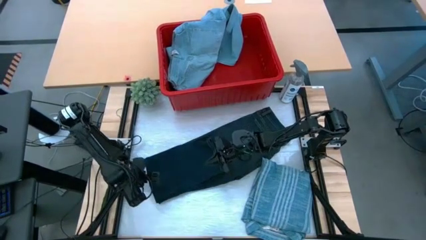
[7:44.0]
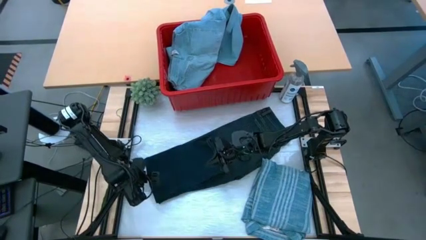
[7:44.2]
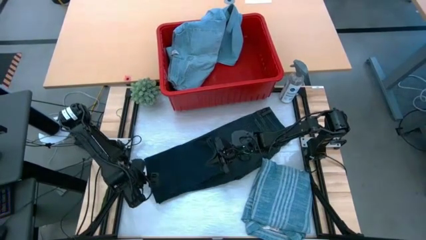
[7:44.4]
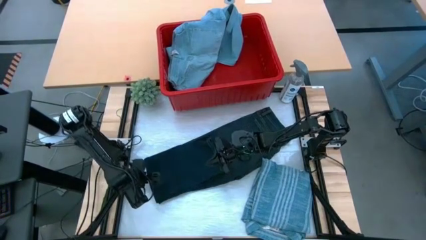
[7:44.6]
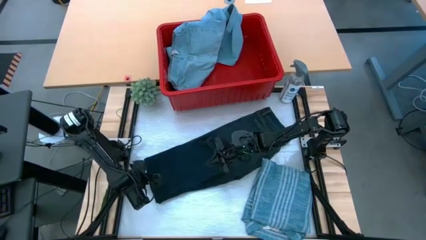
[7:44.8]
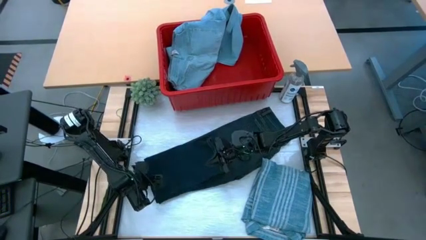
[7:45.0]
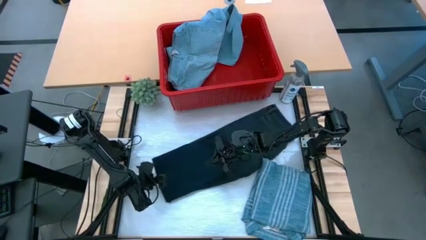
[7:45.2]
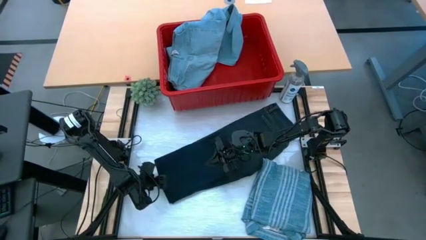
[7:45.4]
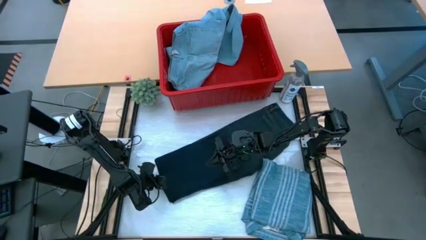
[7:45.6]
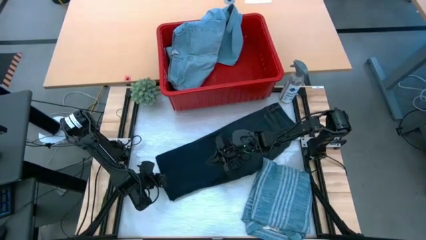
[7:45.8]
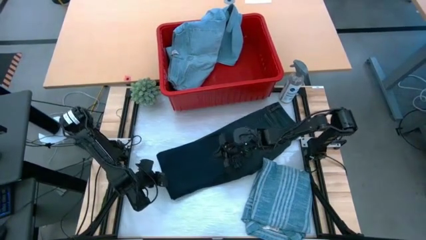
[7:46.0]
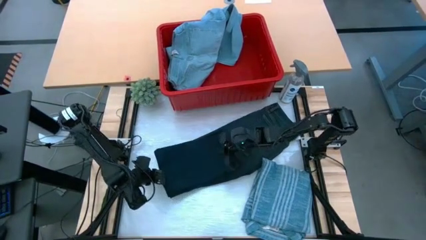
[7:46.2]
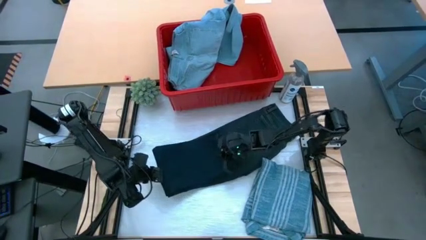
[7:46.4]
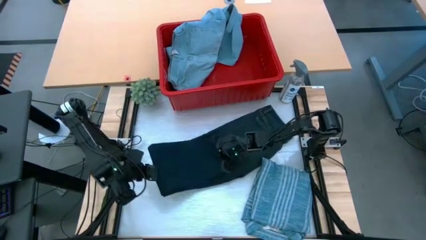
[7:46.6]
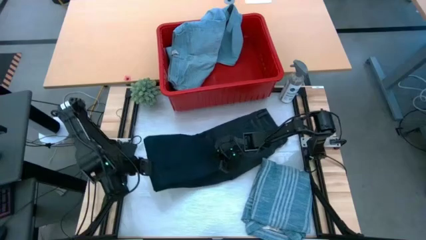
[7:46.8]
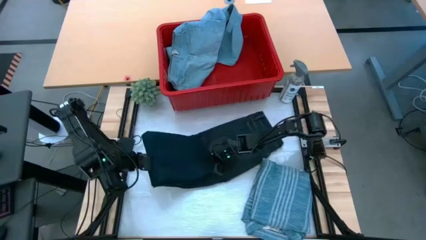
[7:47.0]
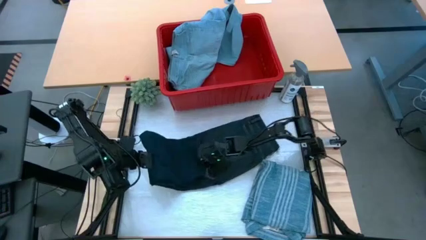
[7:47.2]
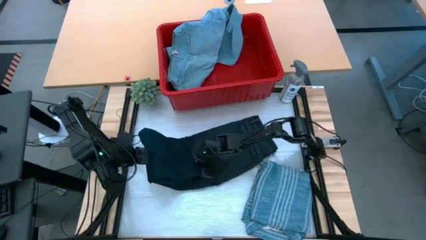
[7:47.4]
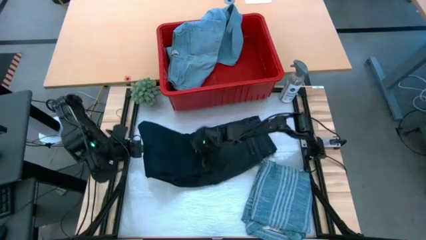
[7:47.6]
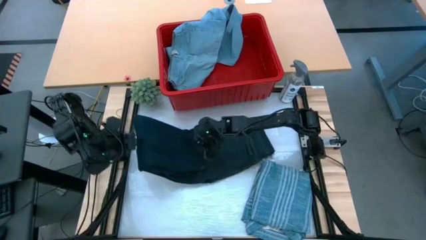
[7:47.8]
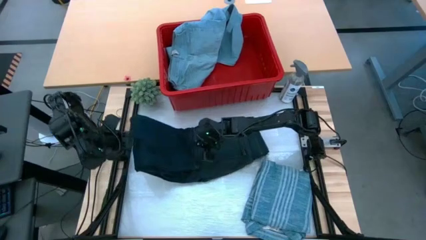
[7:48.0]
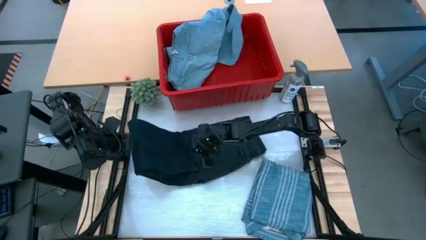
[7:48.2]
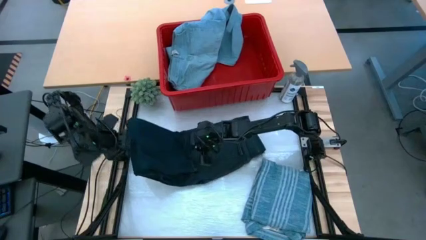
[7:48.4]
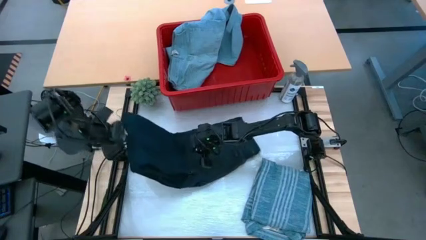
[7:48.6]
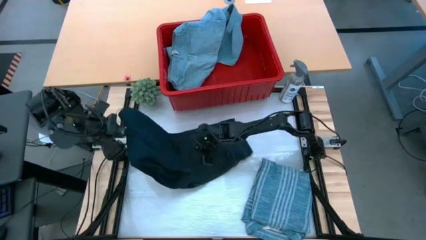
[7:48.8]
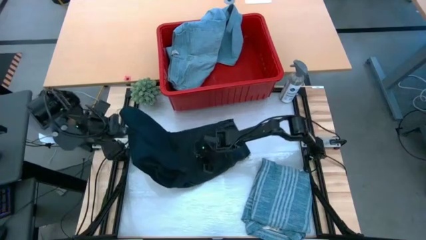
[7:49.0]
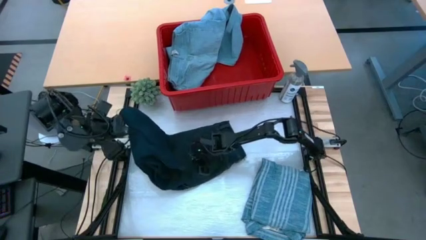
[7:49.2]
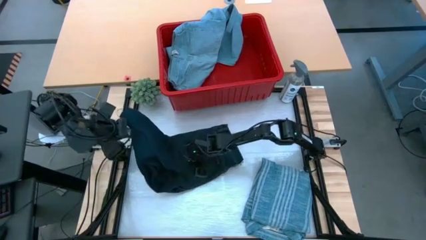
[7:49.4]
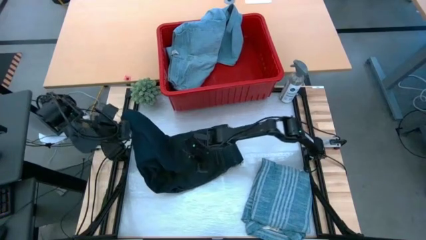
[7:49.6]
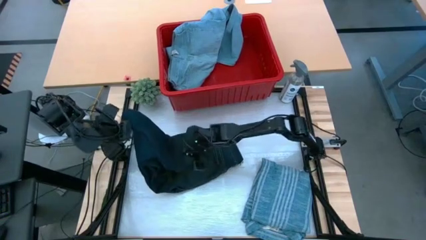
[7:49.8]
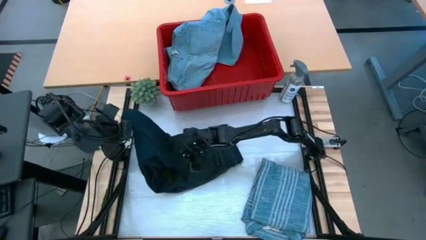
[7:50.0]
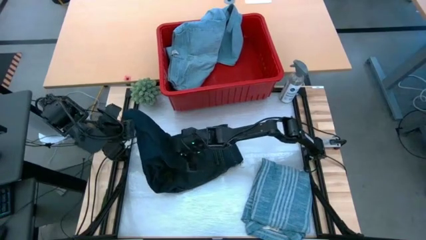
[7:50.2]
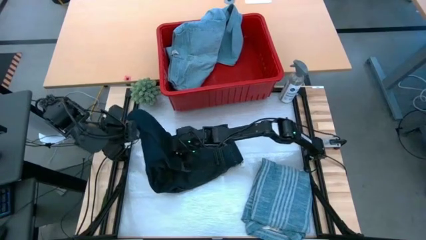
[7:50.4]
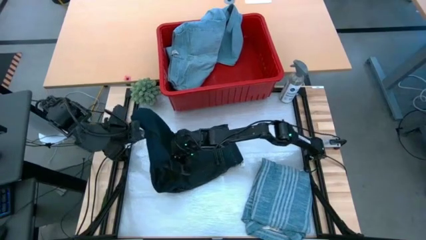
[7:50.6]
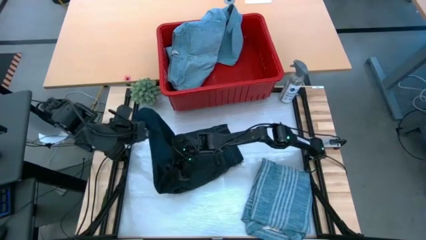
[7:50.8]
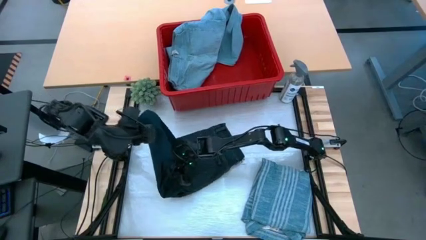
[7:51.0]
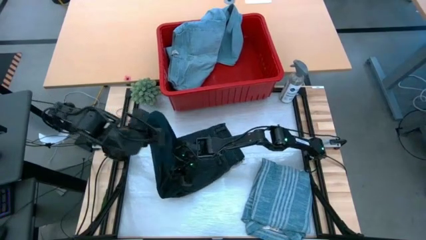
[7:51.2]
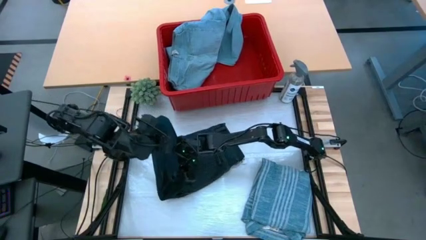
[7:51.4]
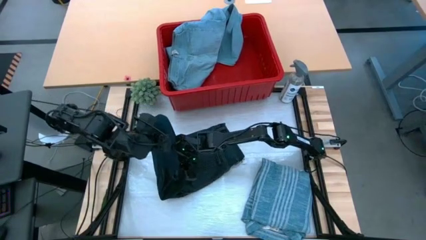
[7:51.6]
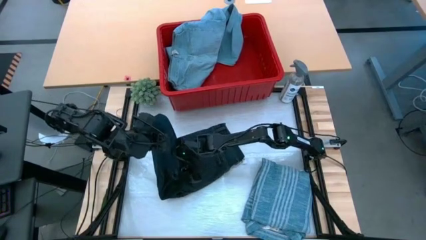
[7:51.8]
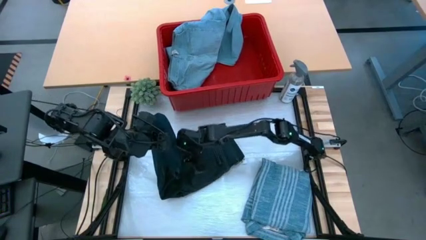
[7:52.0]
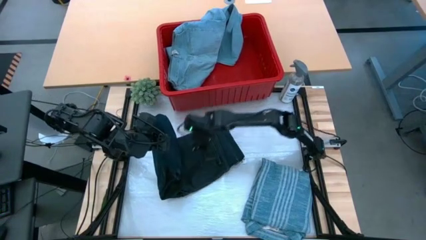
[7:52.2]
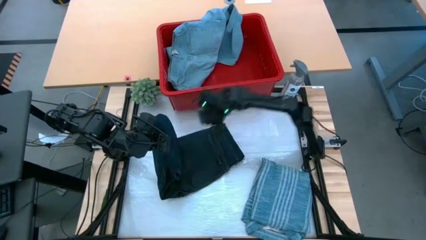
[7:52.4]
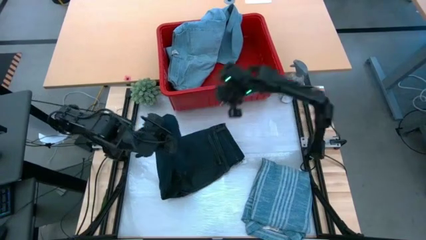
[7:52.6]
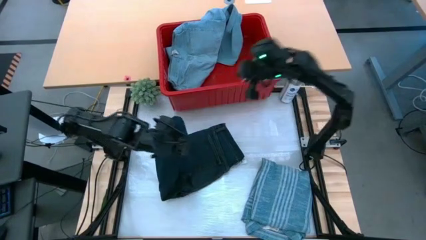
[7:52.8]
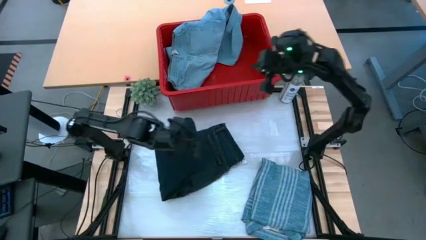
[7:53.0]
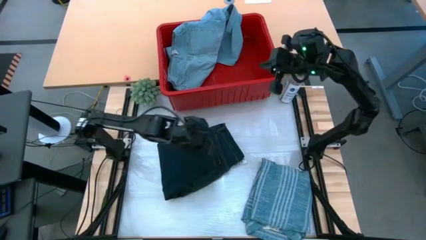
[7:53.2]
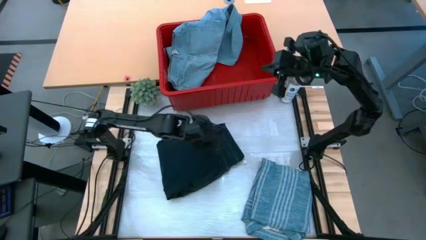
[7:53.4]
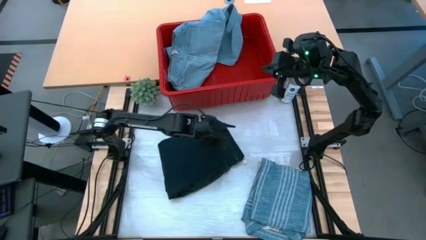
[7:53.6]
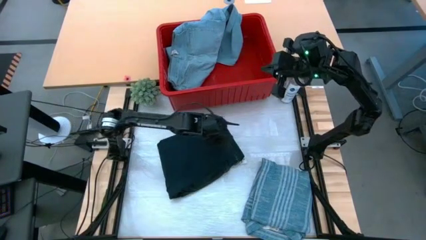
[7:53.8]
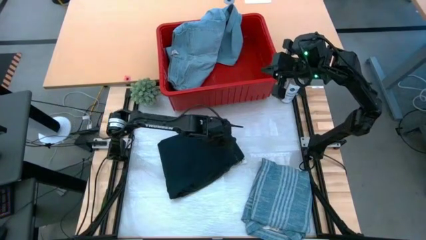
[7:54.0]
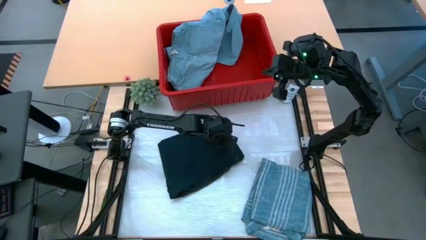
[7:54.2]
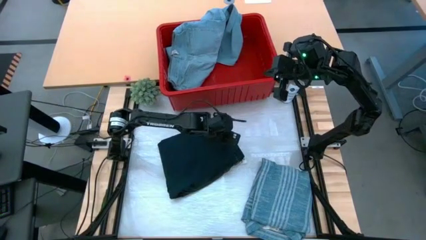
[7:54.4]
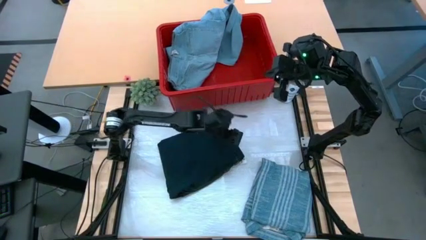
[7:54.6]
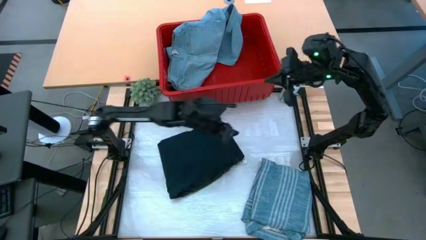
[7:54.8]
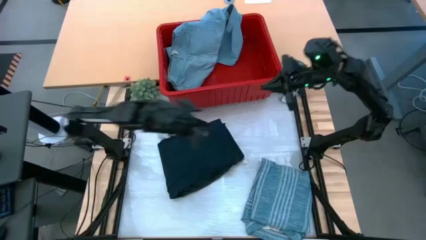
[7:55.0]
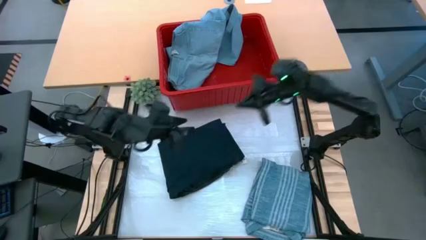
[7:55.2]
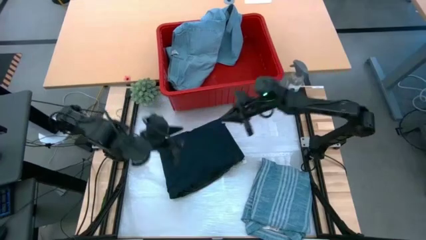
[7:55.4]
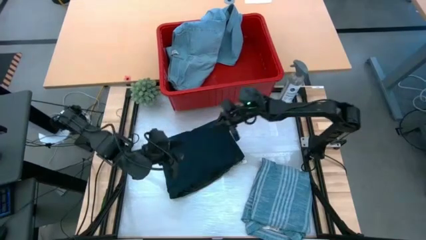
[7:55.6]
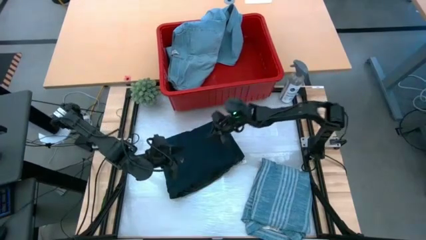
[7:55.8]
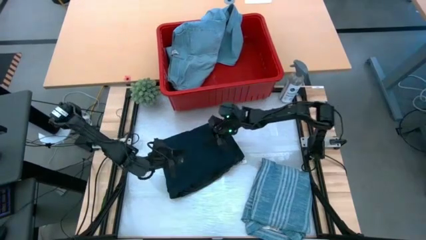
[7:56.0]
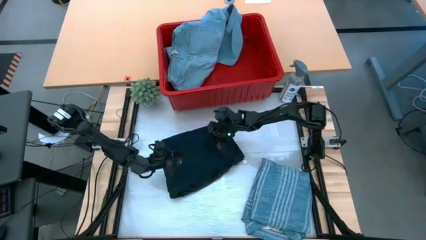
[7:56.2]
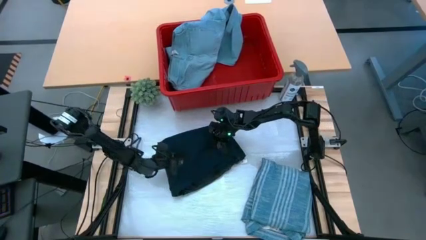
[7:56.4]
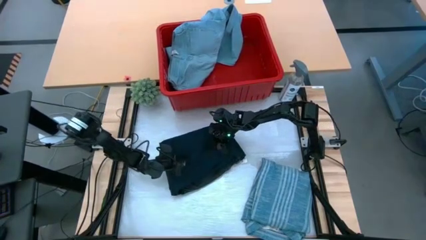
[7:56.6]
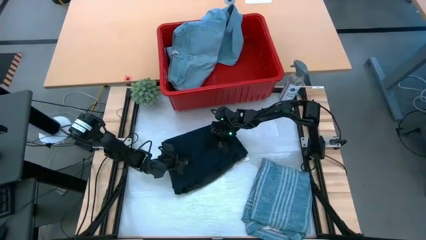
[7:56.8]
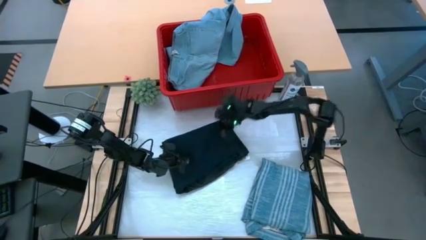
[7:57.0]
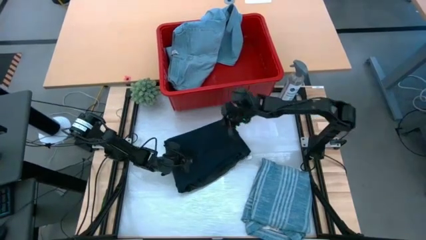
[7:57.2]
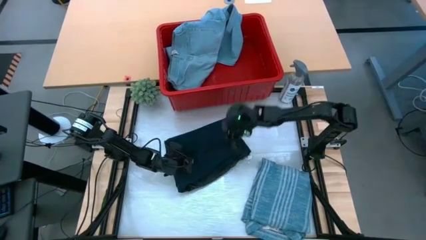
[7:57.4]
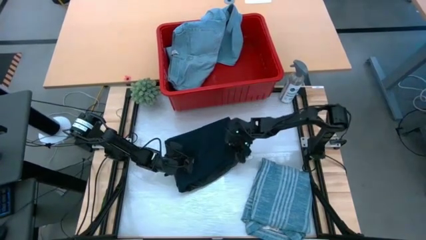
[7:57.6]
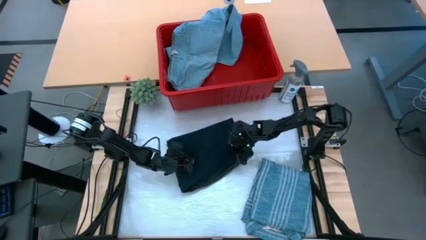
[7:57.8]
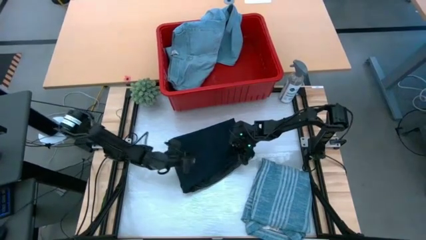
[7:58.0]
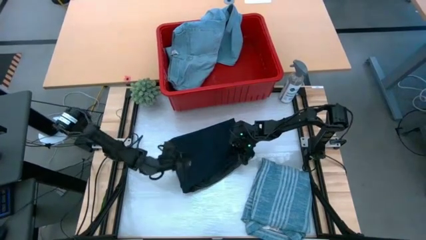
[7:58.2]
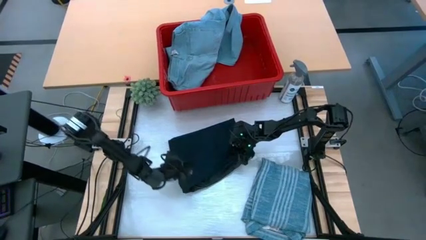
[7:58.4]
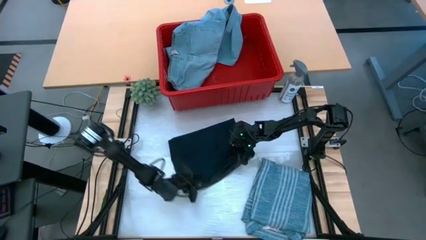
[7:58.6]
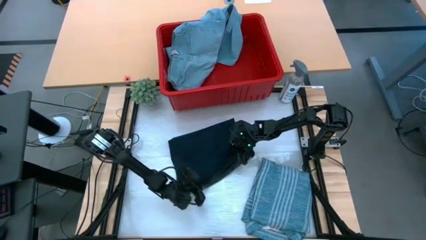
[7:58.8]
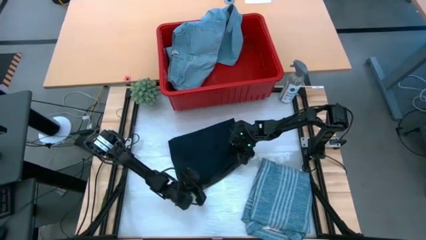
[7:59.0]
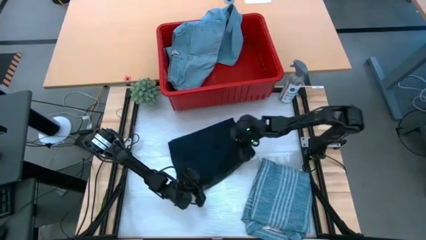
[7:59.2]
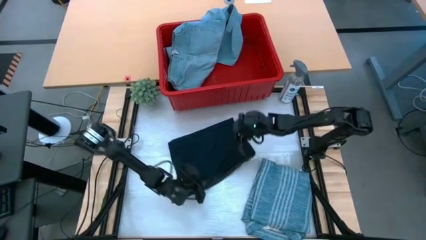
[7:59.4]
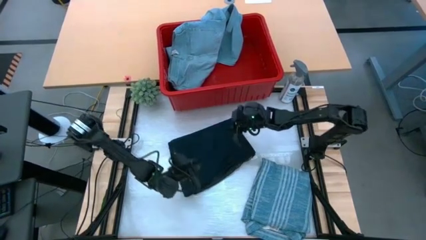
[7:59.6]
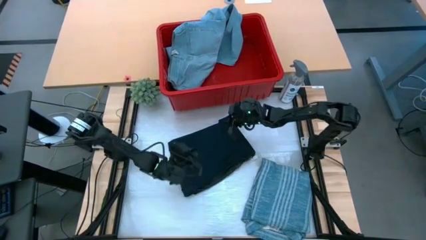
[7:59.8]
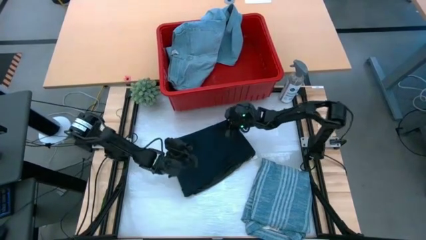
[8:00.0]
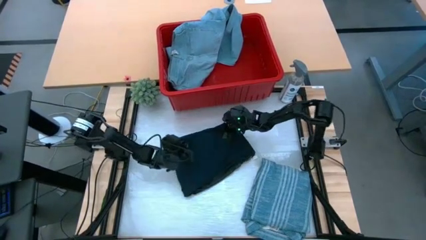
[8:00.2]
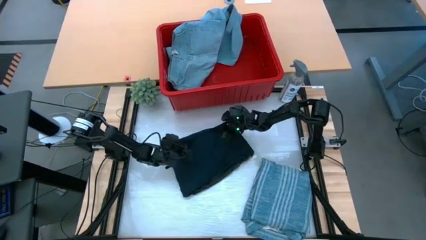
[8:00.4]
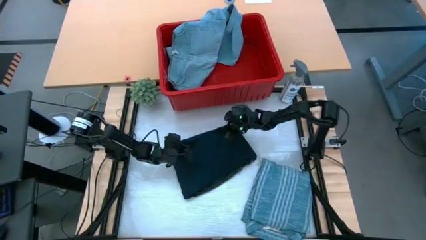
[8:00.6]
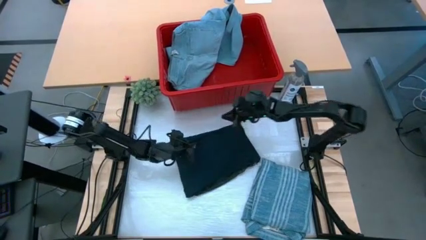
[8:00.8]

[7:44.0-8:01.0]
Task: Fold Laundry from Bin
Fold the blue denim pants
